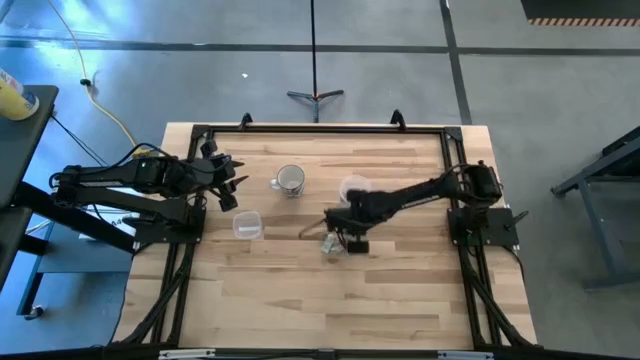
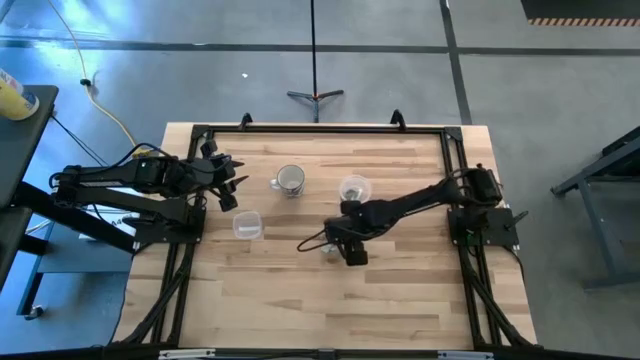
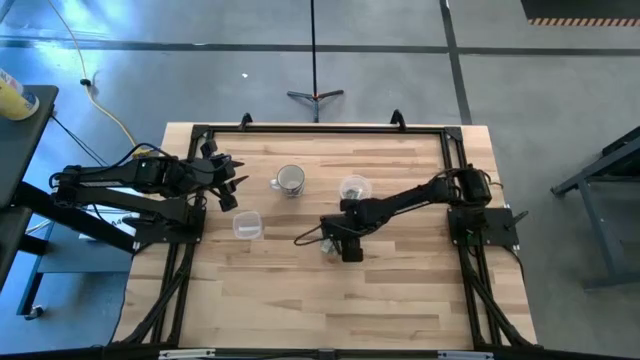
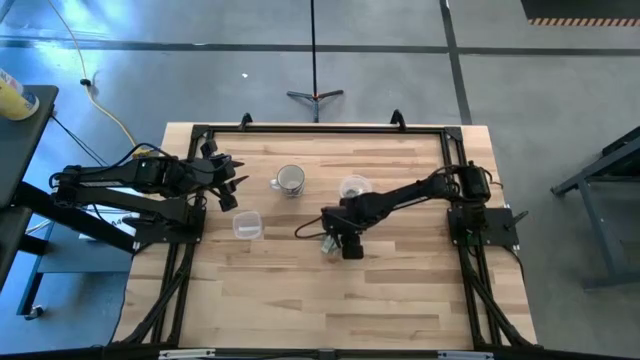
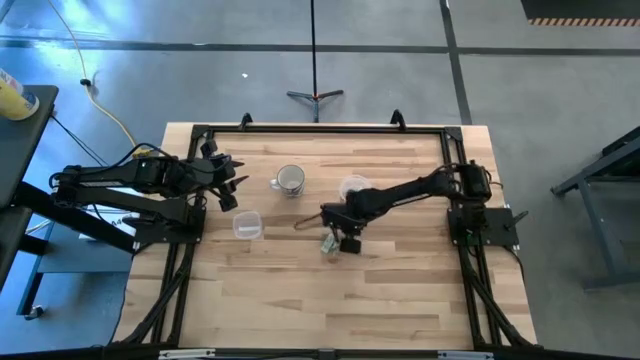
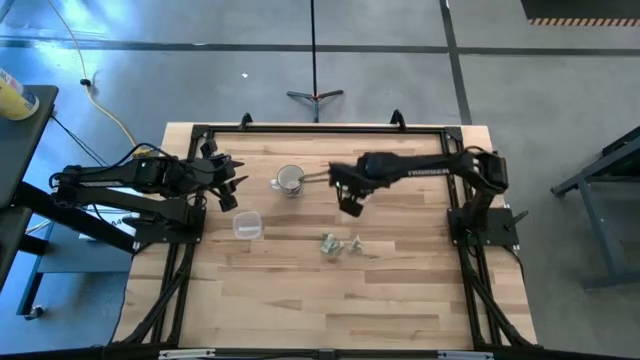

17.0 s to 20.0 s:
Task: Pick and place Stevia / Truvia into bins
Put the white stevia packet into the transparent container

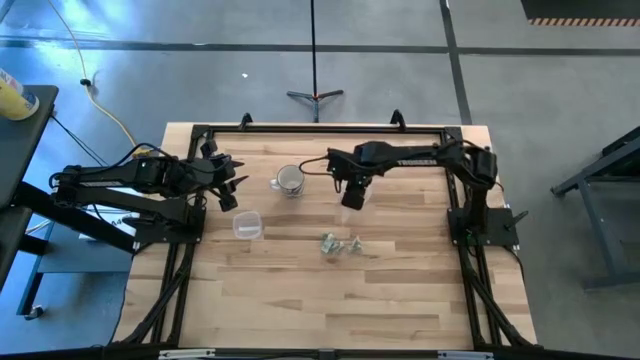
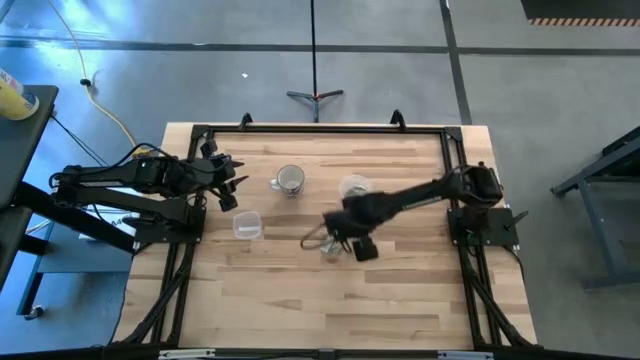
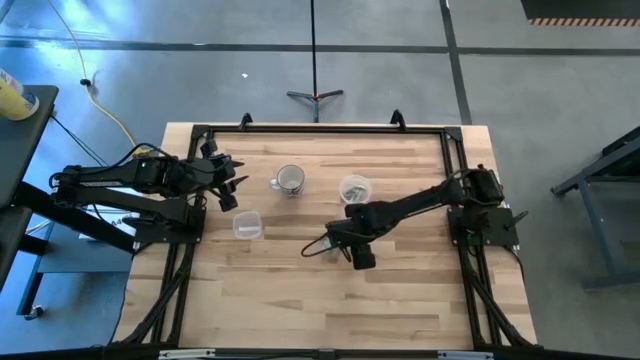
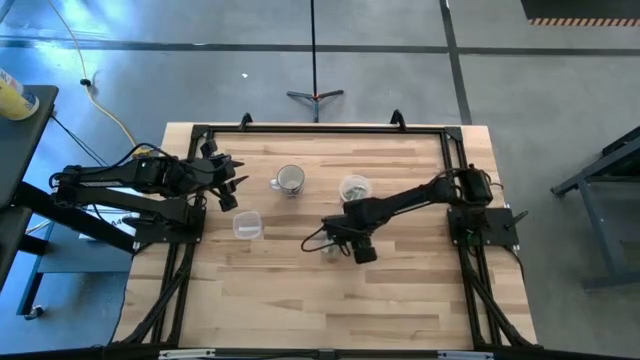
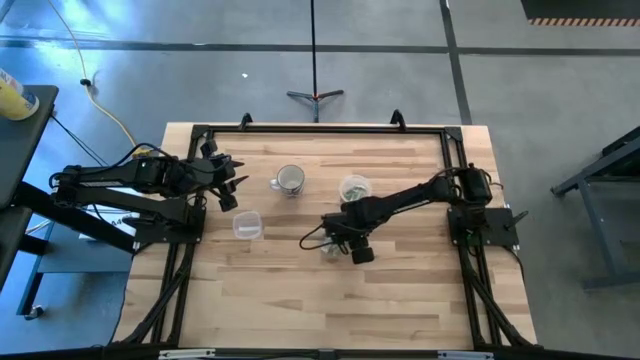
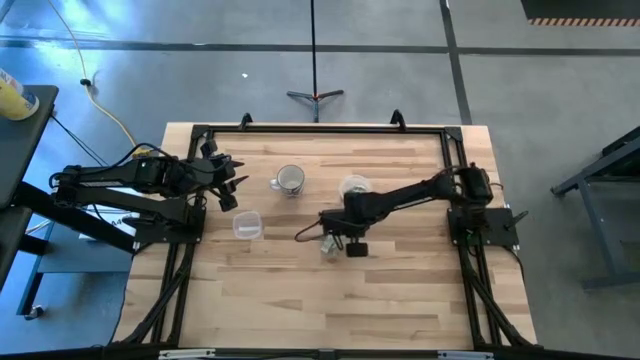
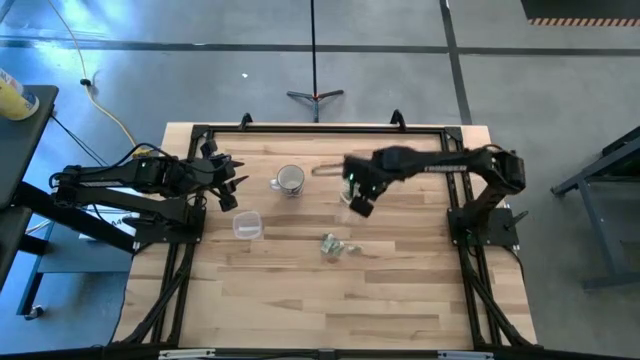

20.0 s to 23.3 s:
Put the white stevia packet into the transparent container

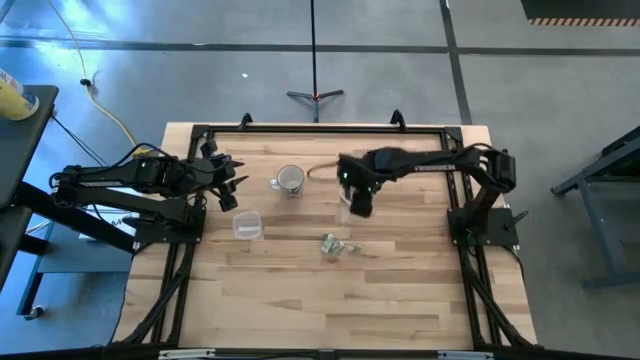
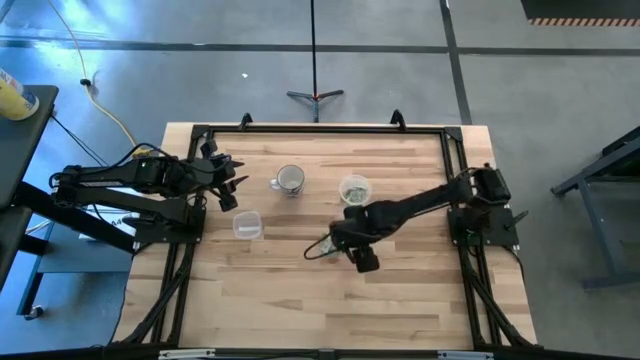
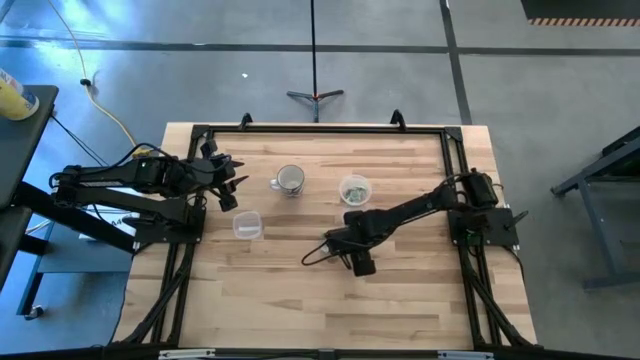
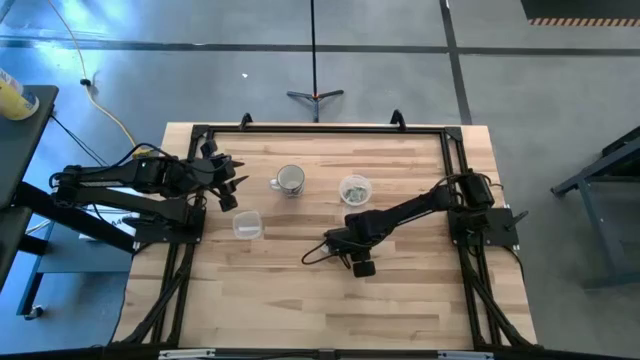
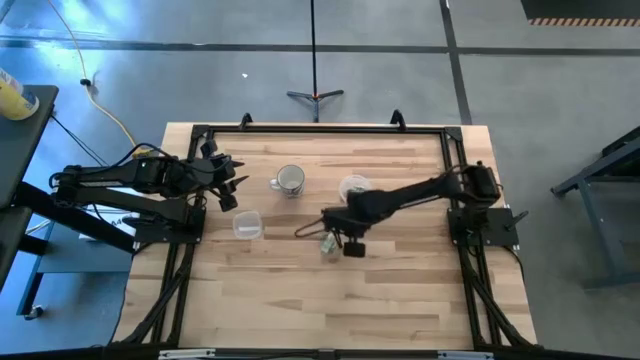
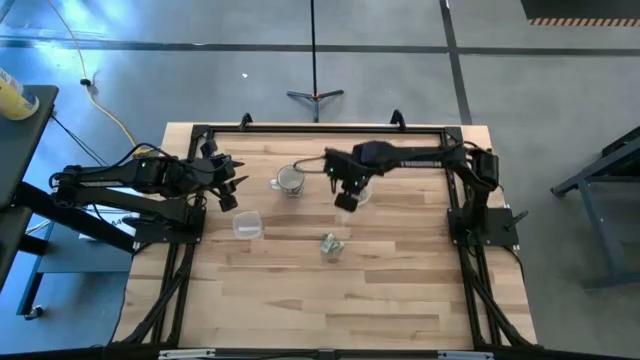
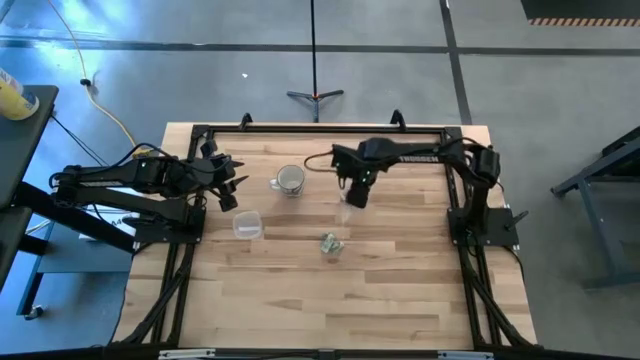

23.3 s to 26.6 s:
Put the white stevia packet into the transparent container

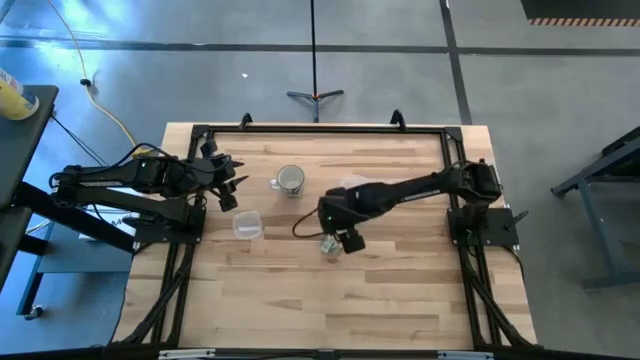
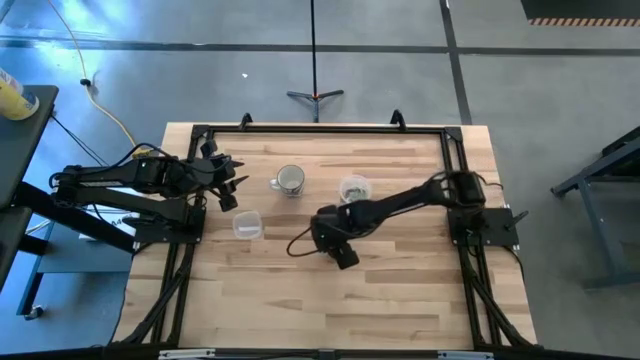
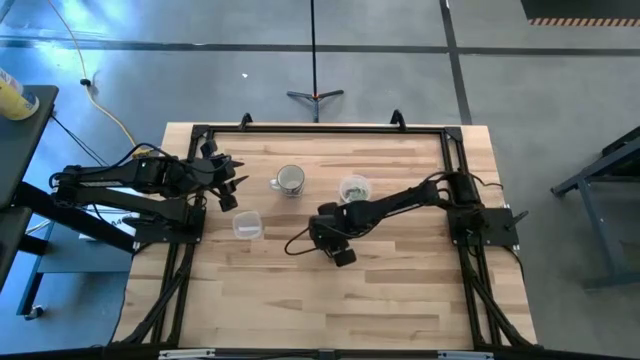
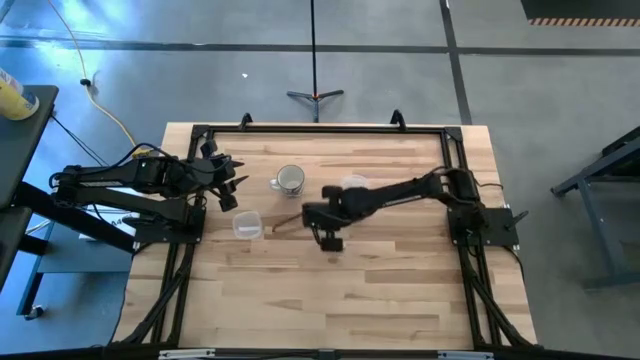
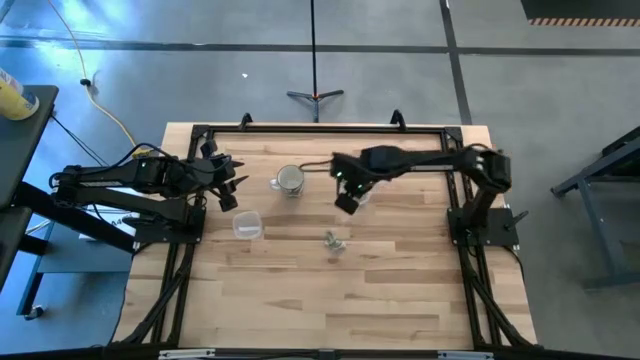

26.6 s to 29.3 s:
Put the white stevia packet into the transparent container

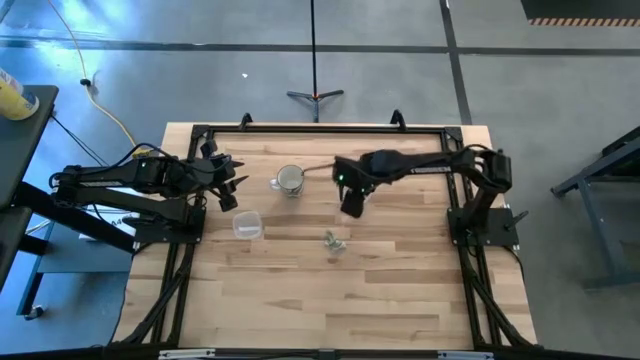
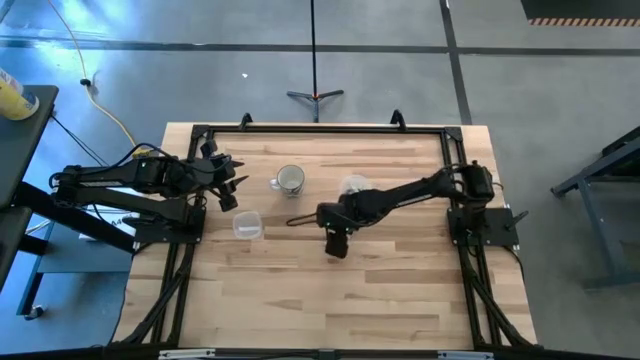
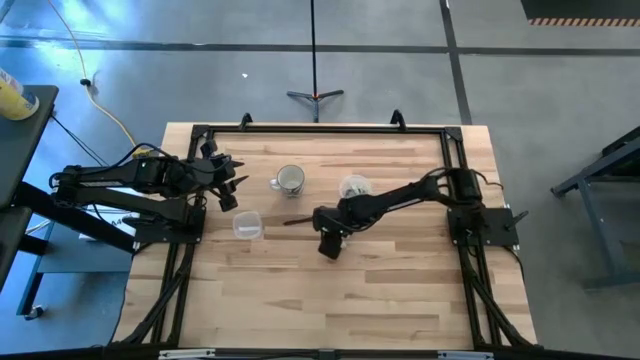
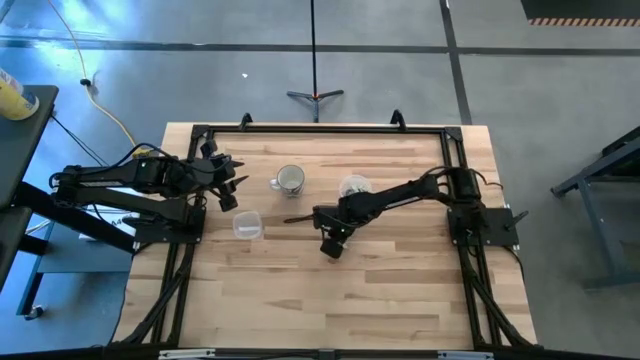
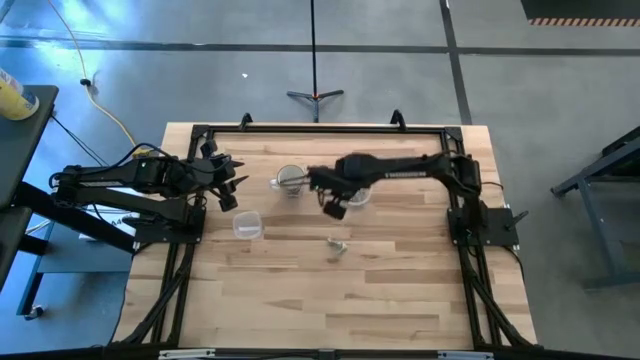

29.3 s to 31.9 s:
Put the white stevia packet into the transparent container

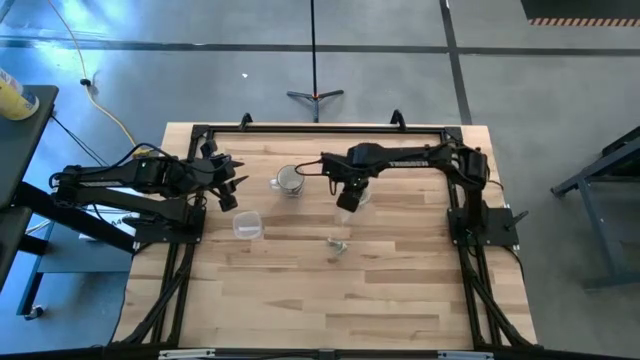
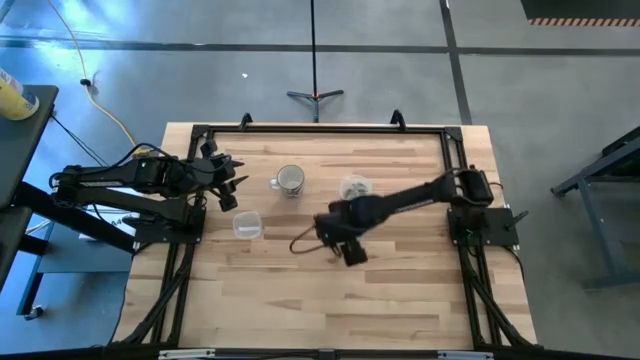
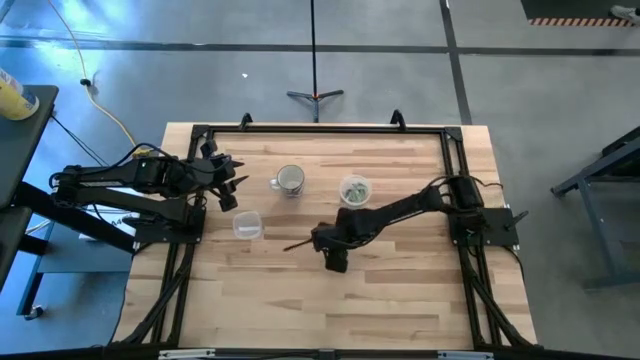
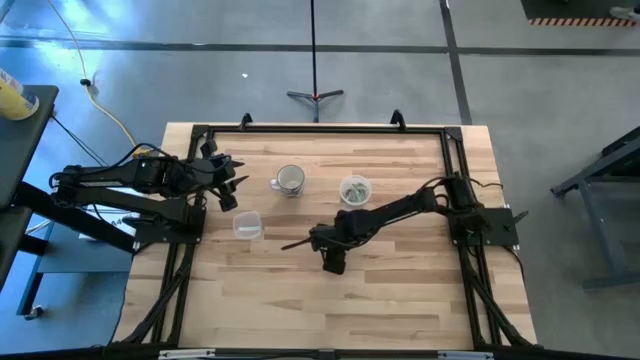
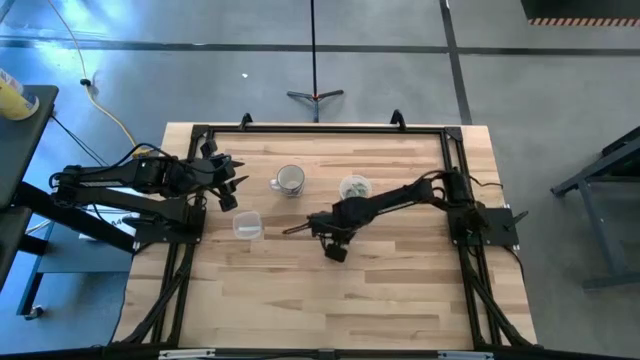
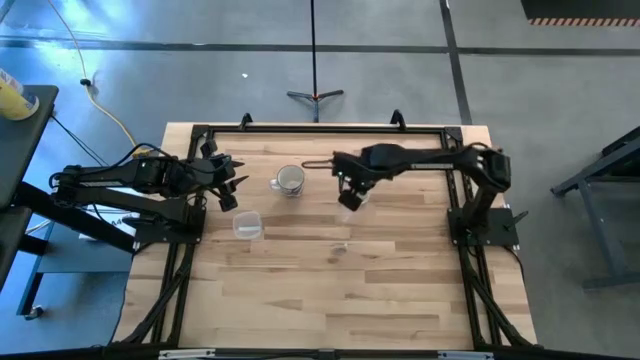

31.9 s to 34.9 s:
Put the white stevia packet into the transparent container

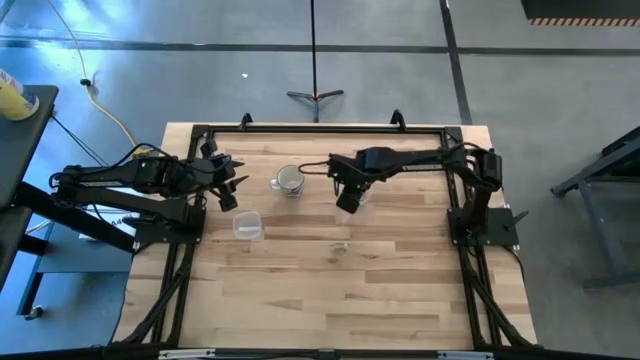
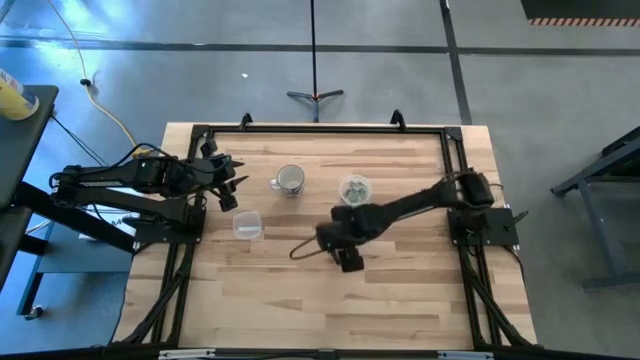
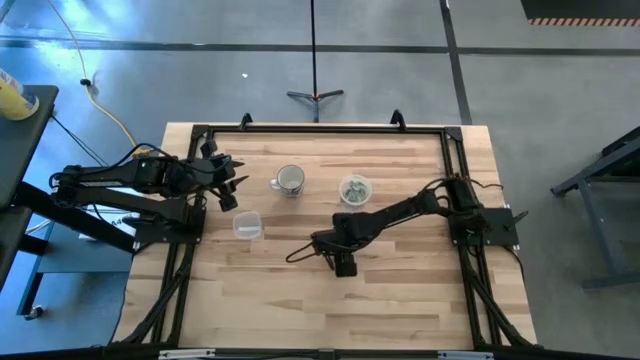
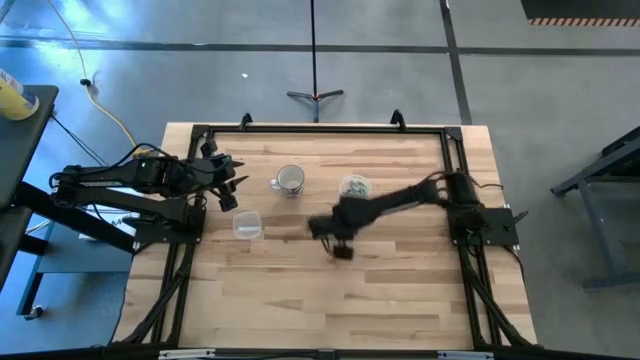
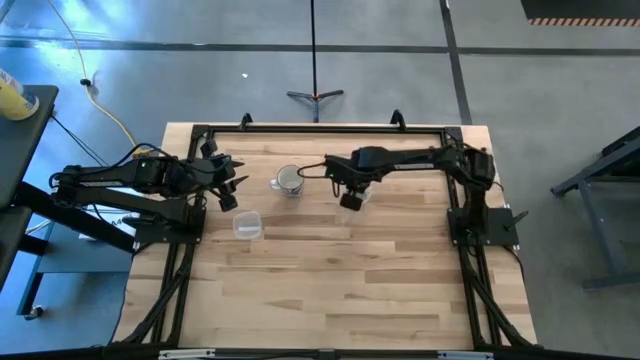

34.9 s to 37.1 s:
Put the white stevia packet into the transparent container

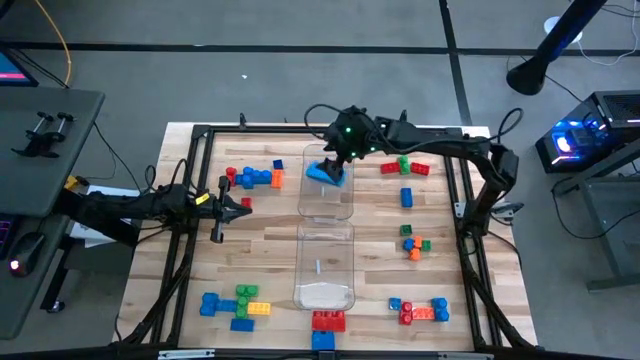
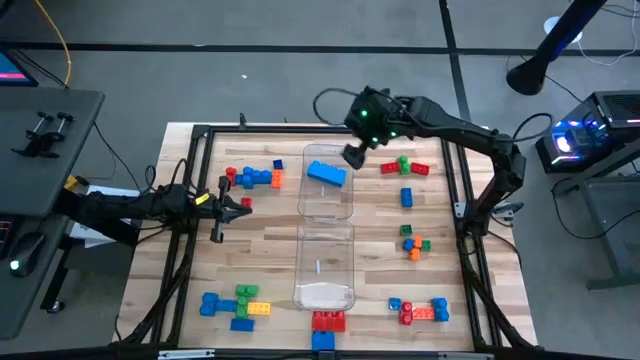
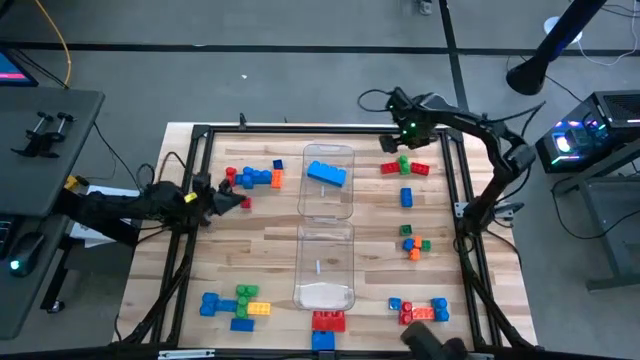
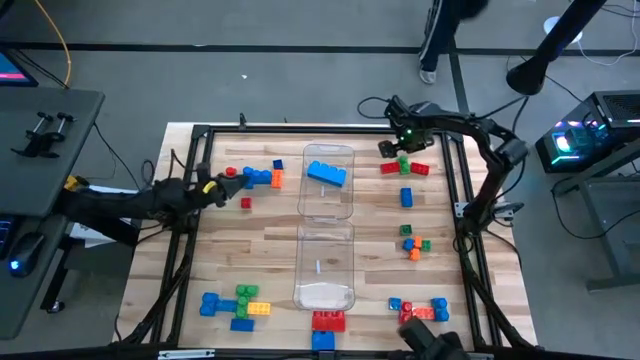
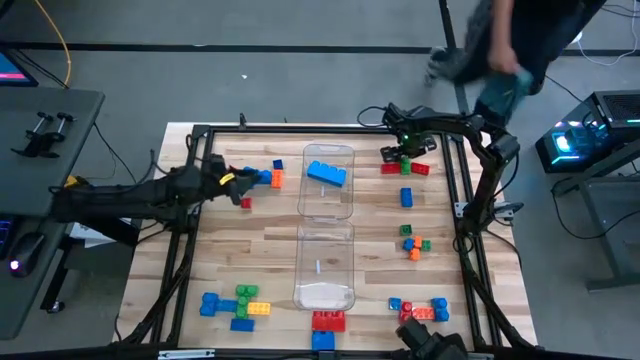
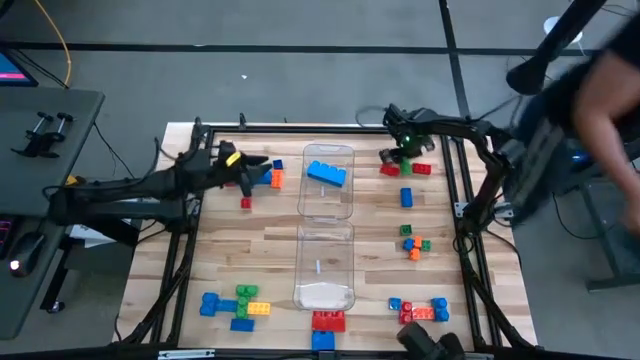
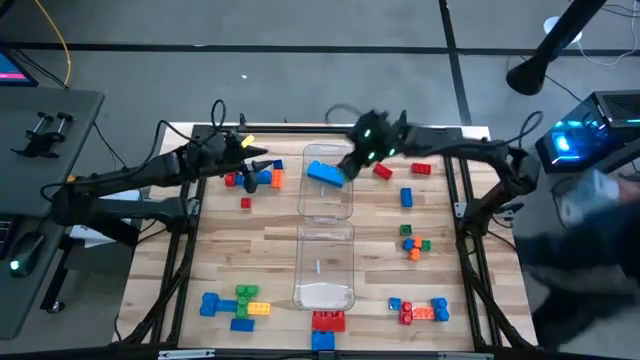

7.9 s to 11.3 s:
Task: Sort blocks by size
Put the large green game piece in the top transparent bin
